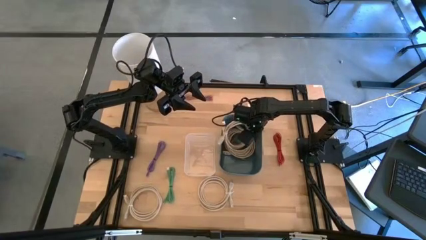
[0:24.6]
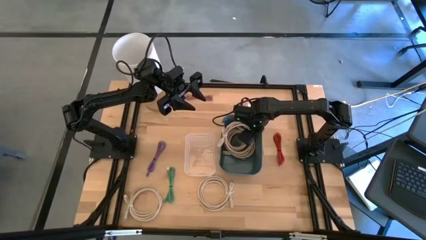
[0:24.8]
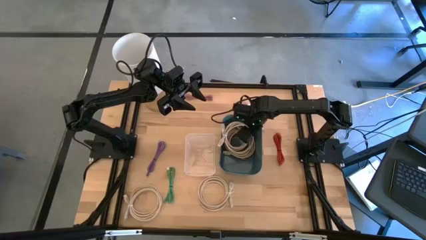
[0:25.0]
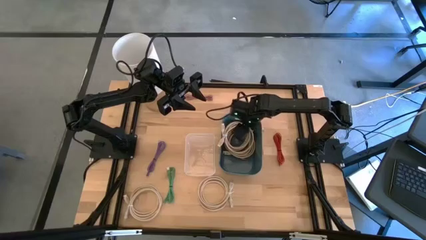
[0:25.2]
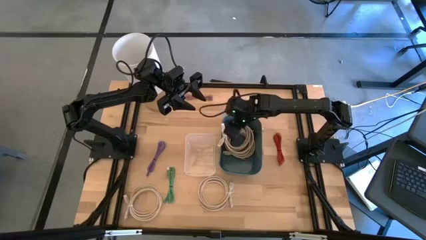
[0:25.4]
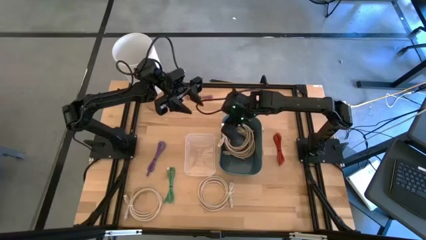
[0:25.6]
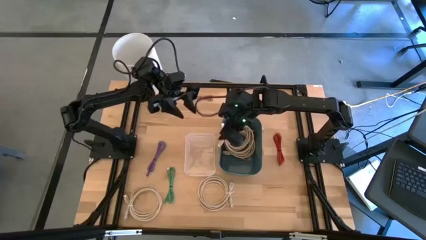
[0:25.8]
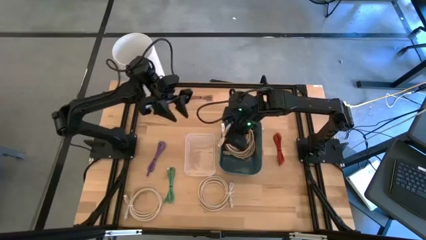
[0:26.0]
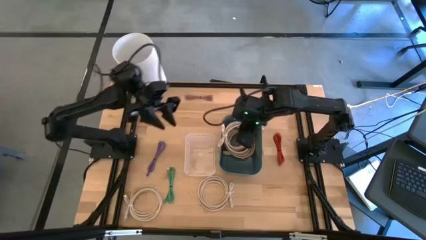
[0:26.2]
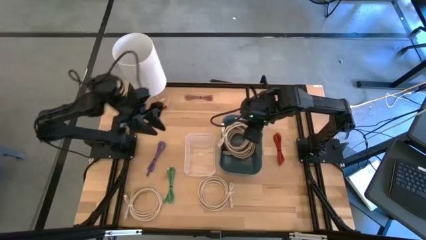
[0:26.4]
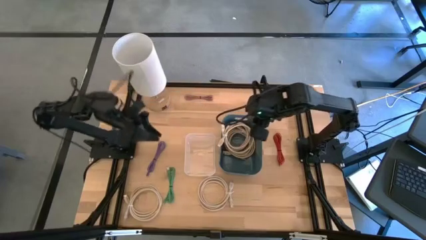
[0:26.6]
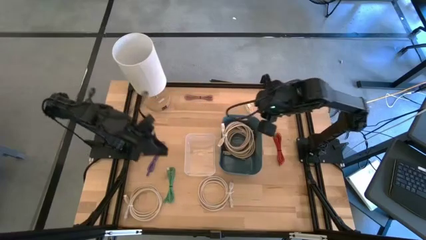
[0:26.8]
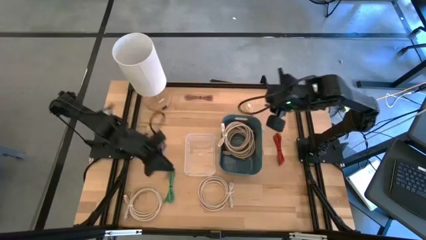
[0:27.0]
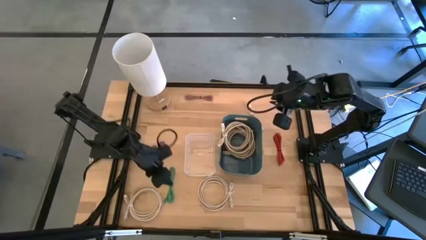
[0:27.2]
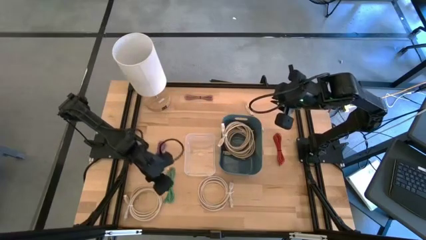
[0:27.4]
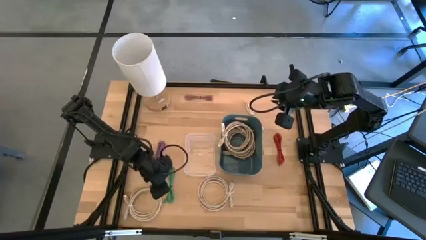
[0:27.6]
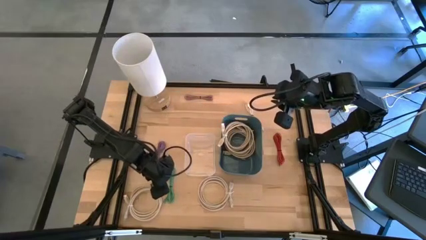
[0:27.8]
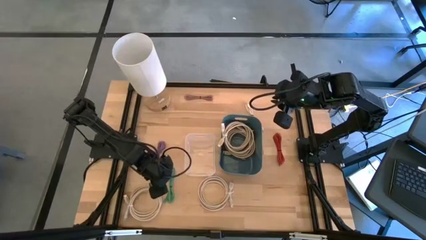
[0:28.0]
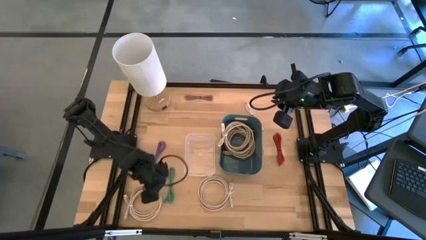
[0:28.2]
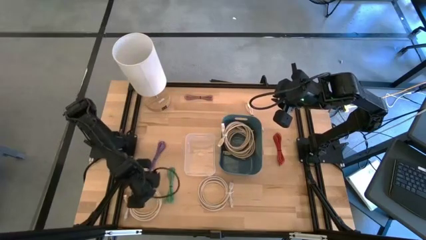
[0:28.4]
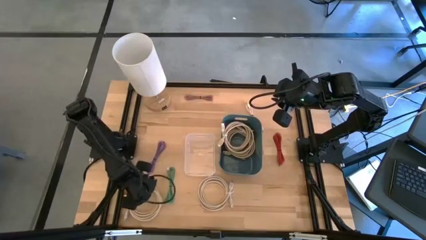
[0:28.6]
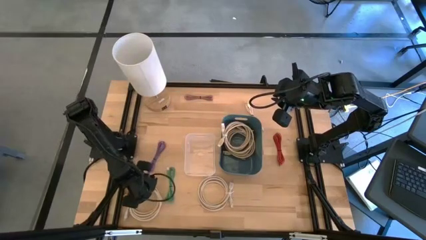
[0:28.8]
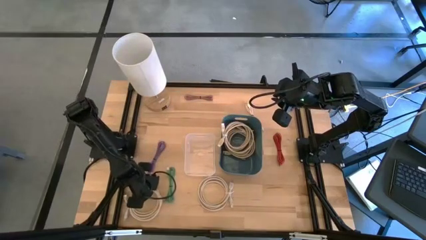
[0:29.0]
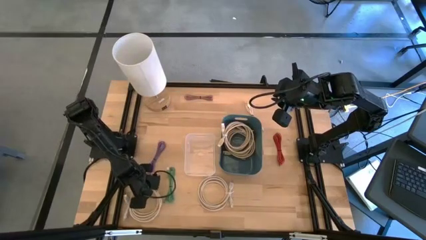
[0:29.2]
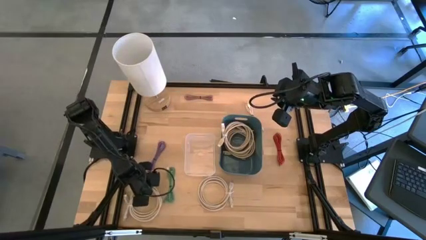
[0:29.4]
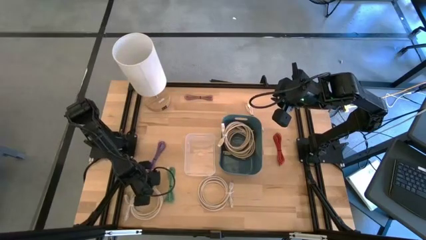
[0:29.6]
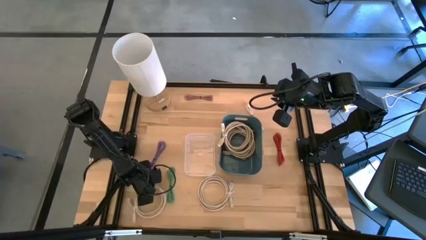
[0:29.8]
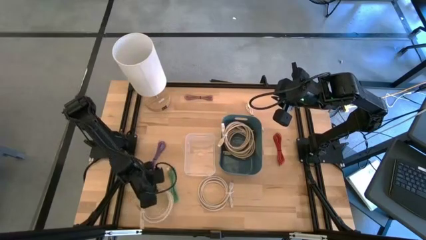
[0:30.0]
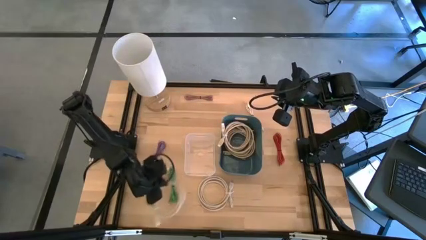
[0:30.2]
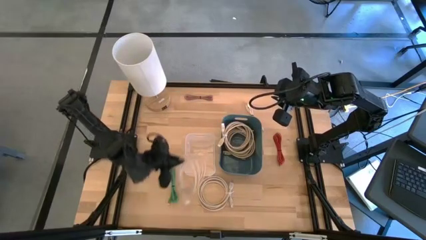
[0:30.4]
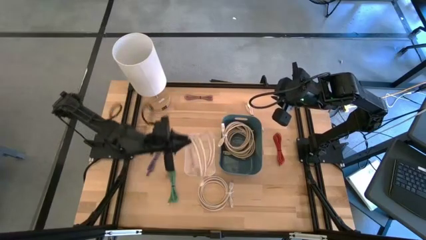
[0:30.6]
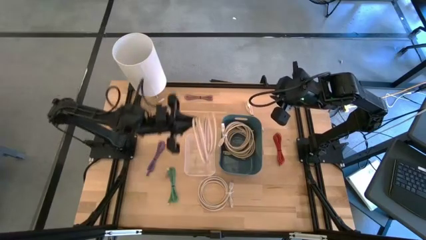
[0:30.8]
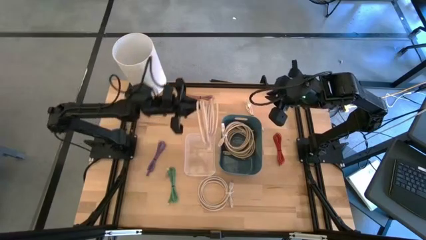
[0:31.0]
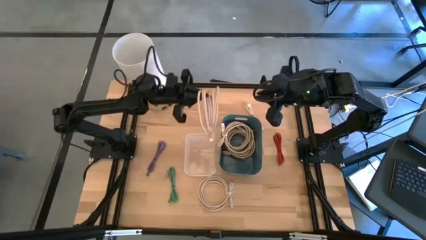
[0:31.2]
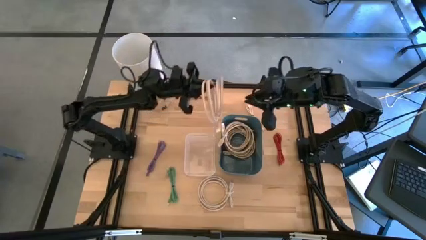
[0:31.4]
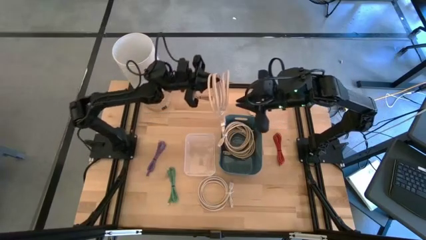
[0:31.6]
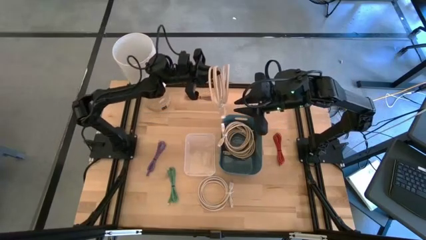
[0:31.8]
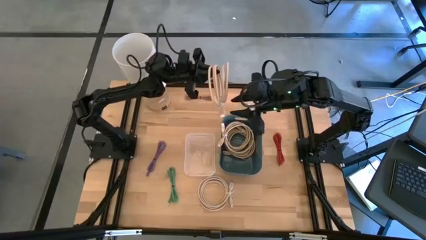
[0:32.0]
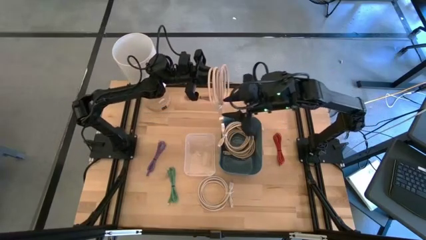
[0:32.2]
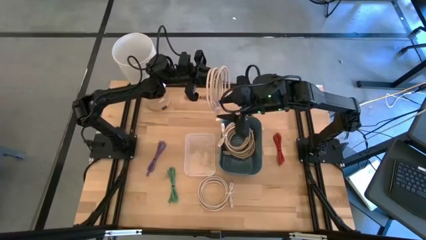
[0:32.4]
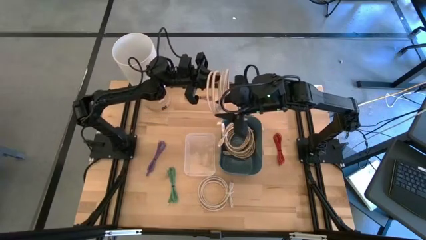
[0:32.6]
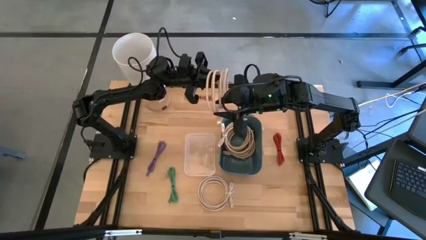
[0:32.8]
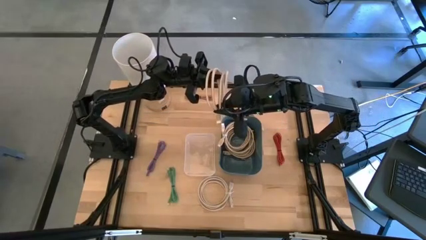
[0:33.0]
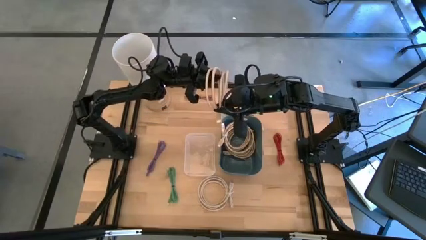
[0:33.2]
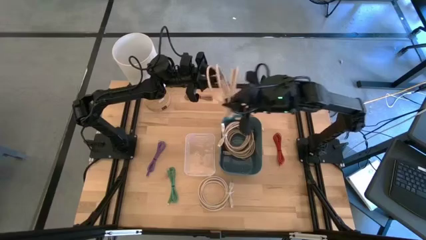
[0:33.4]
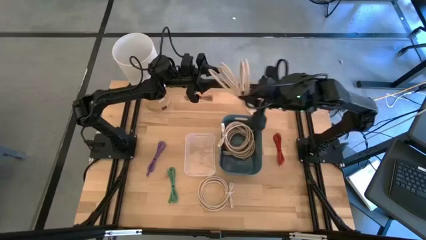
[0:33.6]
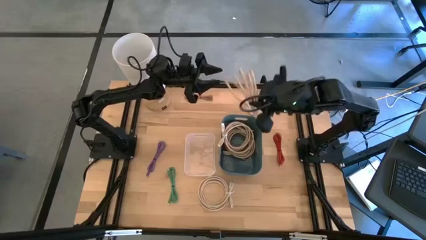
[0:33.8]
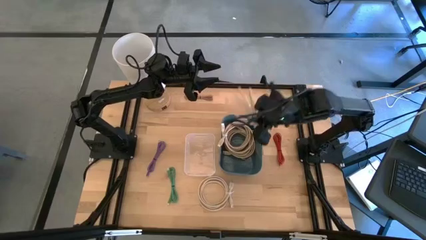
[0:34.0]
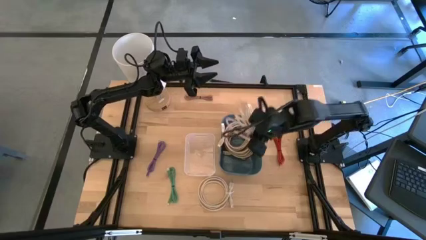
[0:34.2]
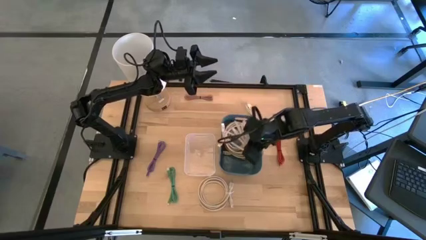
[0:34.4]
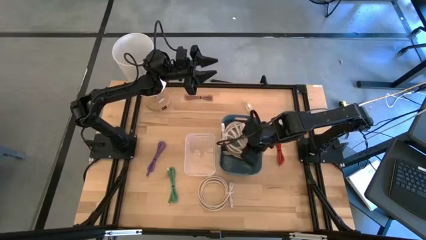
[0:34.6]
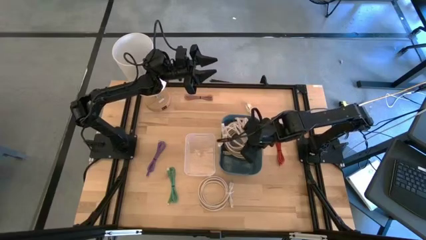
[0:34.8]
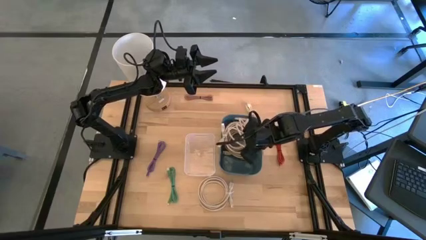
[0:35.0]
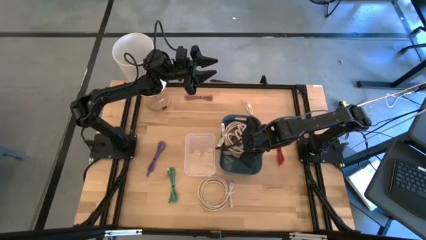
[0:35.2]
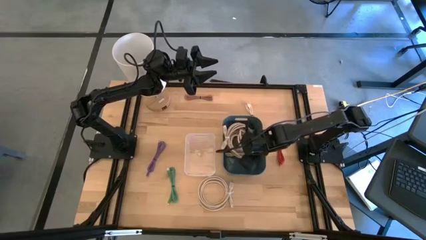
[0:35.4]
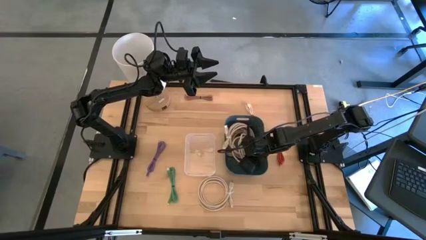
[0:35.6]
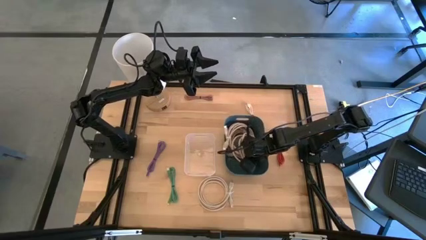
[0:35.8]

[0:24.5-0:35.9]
Put the light brown HDMI cable into the blue bin
